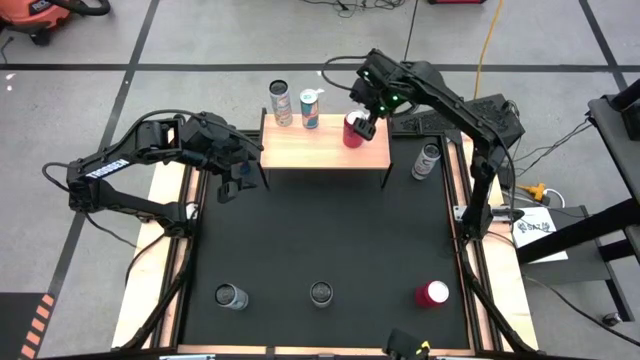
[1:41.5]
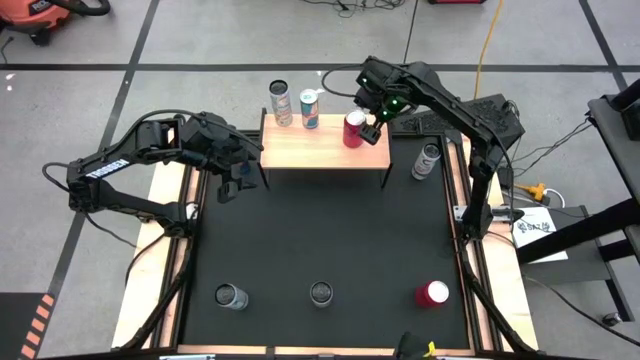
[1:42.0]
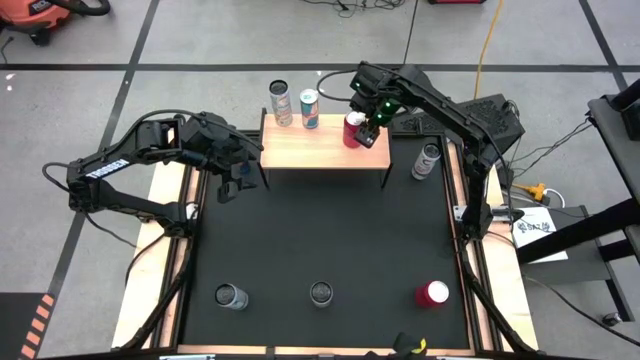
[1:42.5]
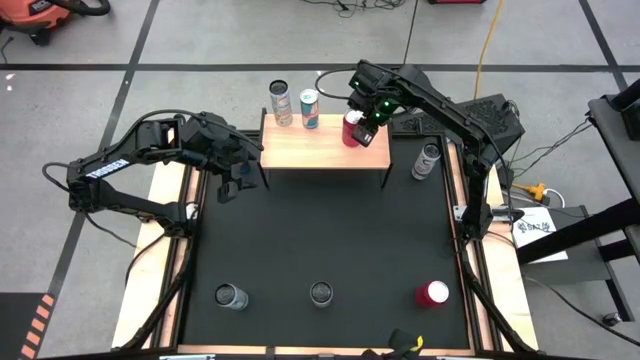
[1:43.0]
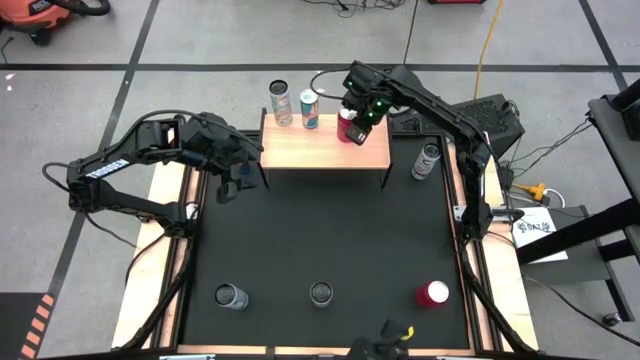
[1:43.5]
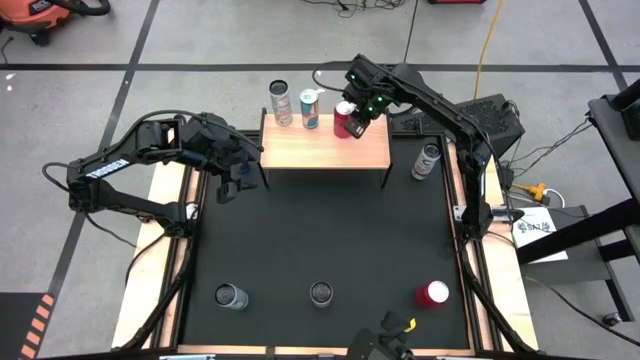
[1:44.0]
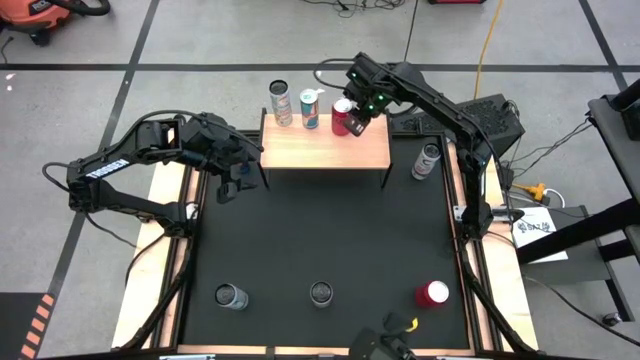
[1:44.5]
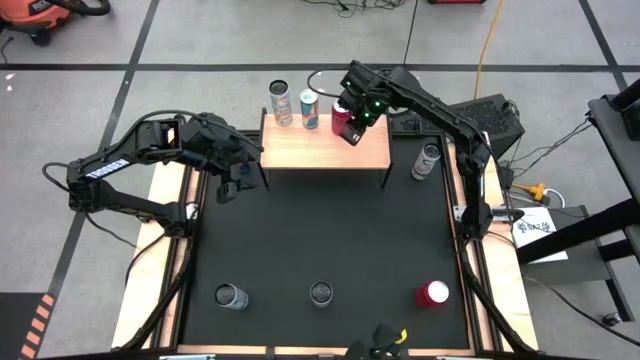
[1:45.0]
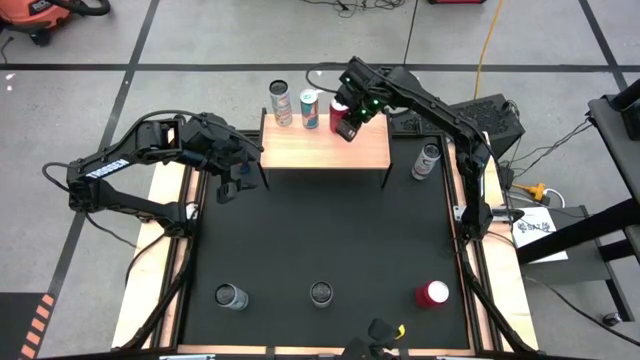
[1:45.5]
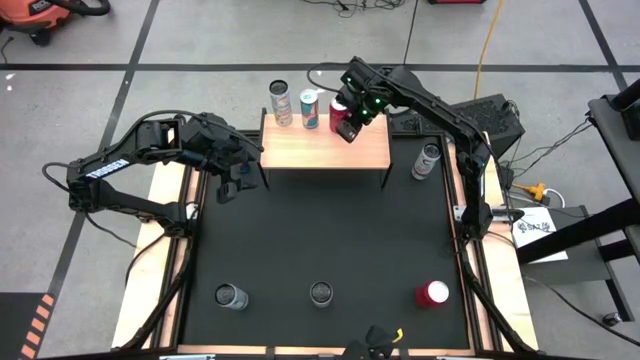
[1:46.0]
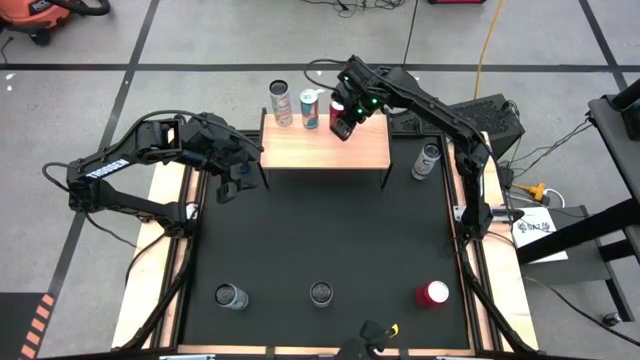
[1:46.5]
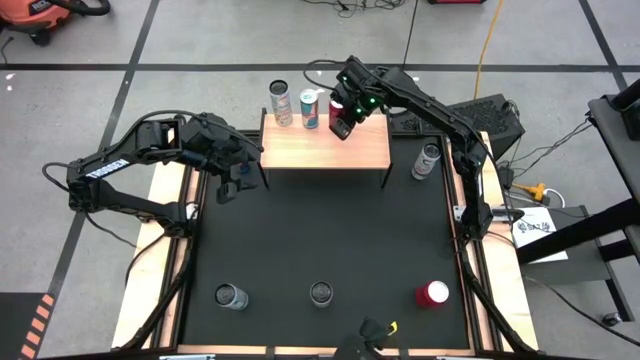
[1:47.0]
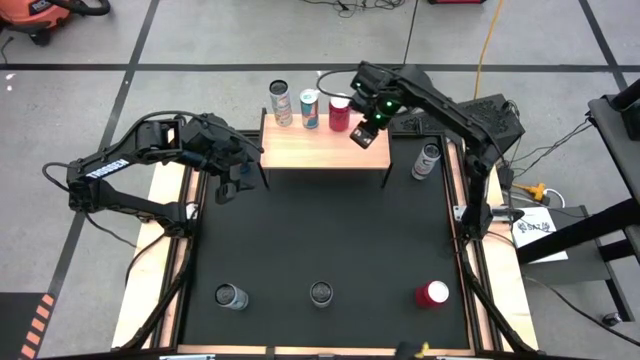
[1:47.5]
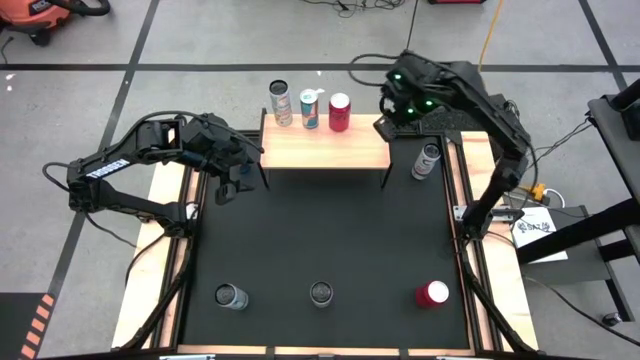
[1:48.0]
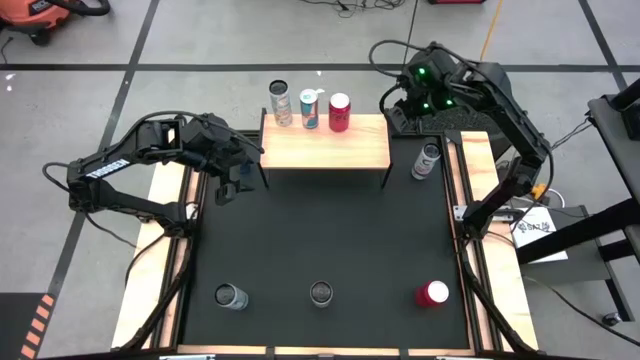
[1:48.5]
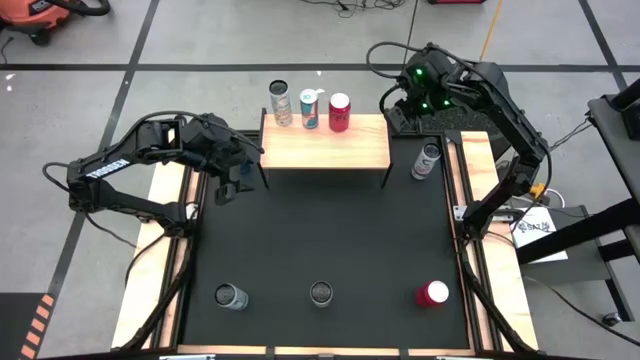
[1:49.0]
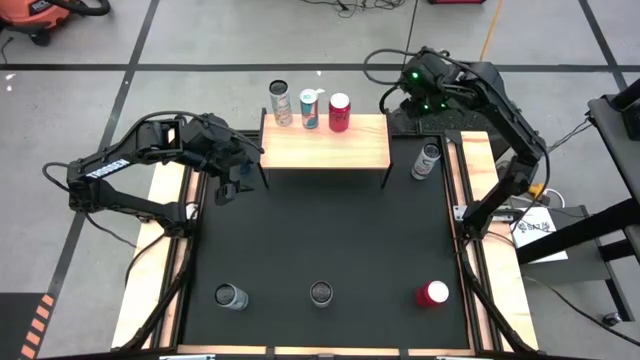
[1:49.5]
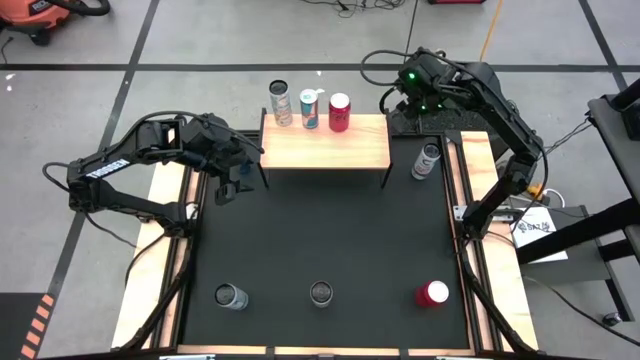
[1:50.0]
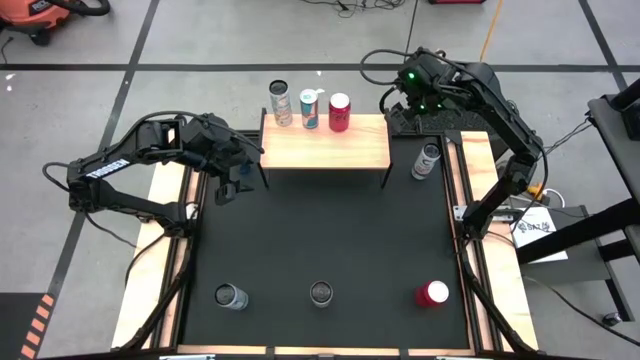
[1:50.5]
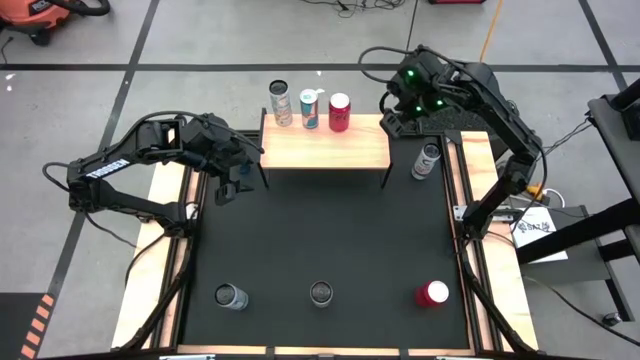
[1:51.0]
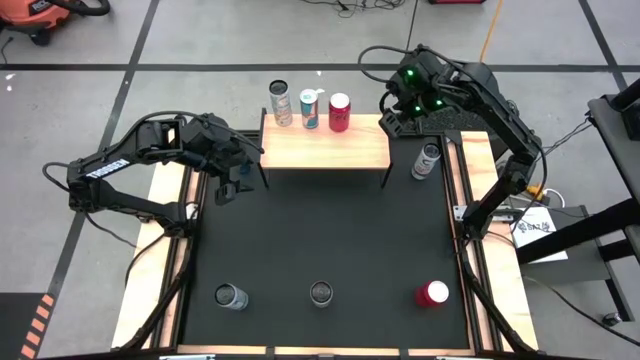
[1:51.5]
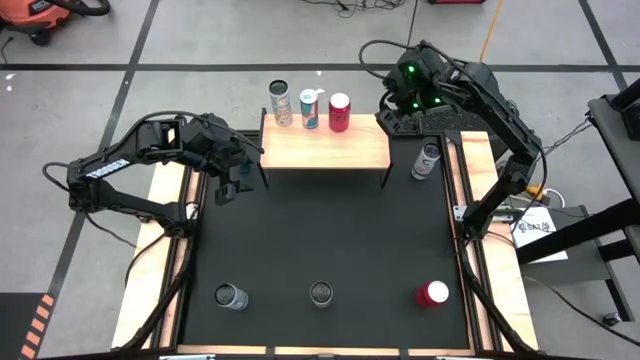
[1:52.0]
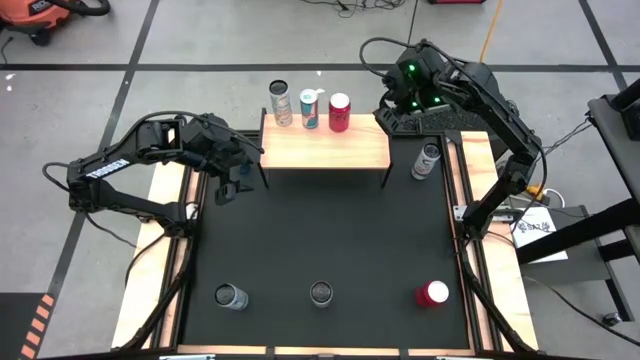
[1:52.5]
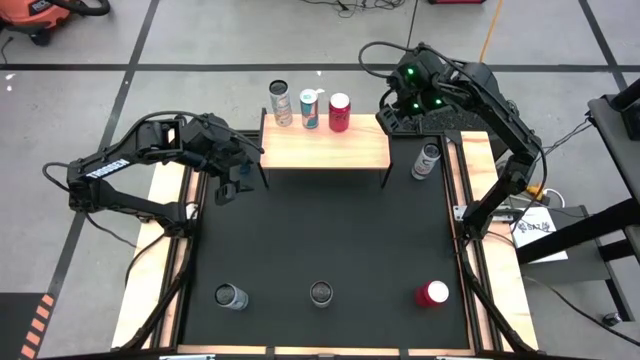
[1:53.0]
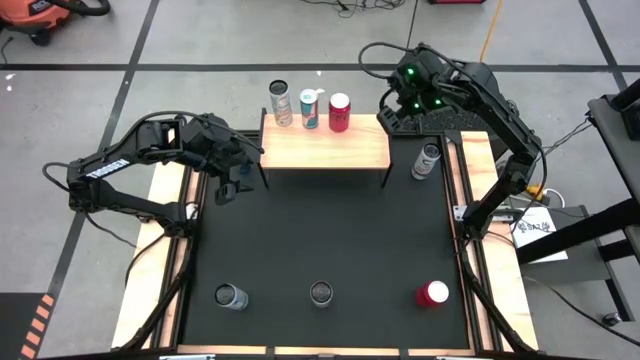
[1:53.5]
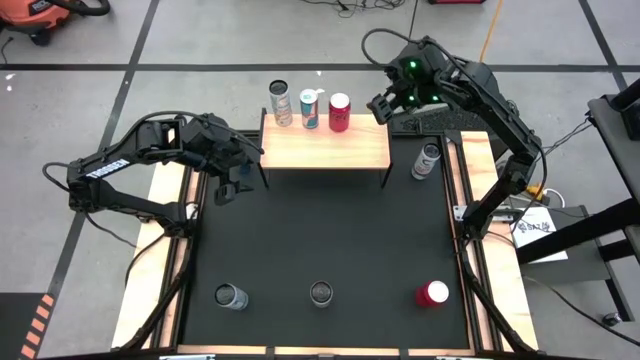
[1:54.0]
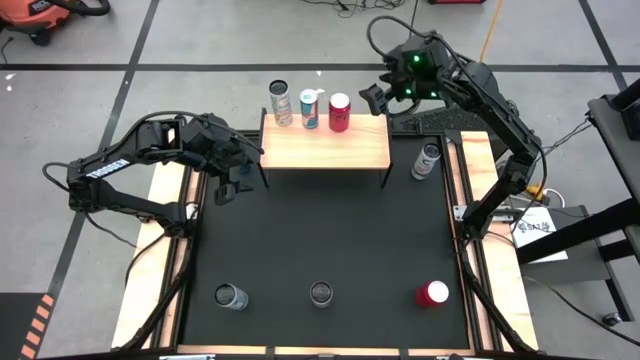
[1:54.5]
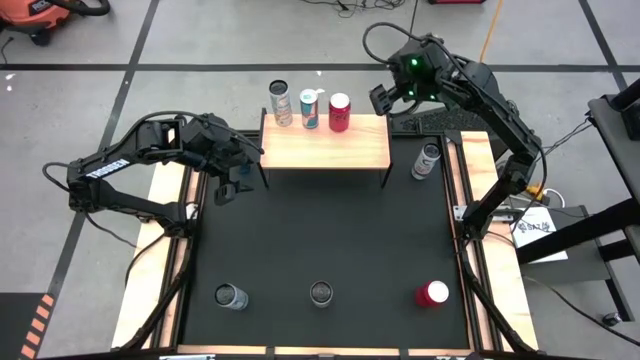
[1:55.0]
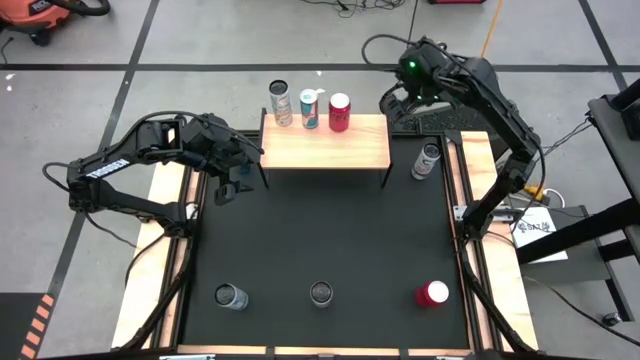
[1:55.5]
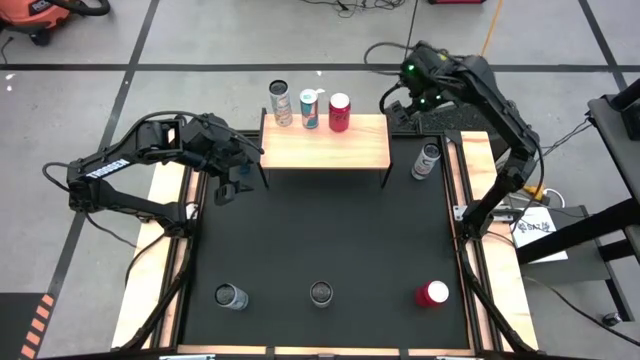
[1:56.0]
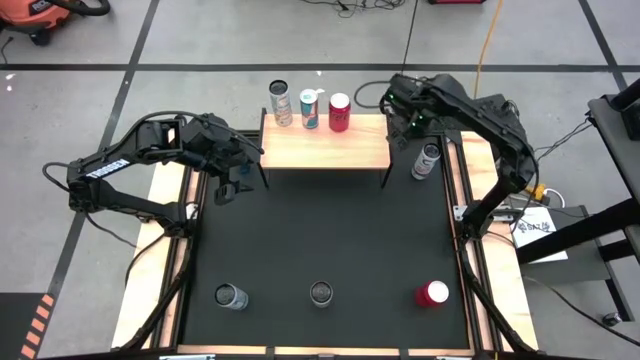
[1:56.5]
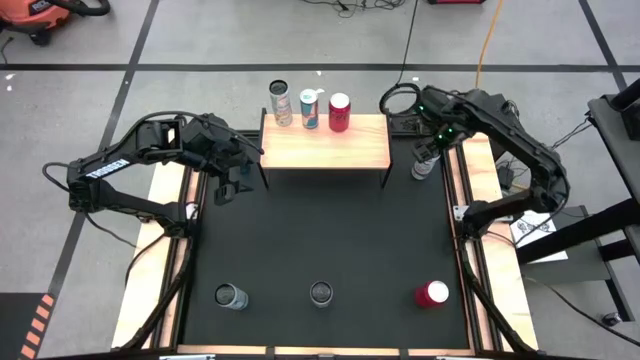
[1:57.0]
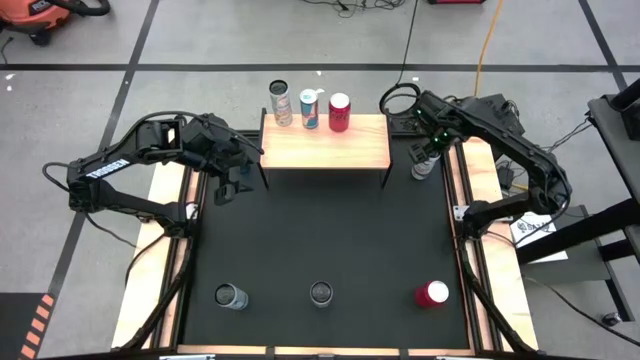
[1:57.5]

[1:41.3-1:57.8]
Task: Place canned beverage on shelf
Put the top white-pink soda can on the shelf

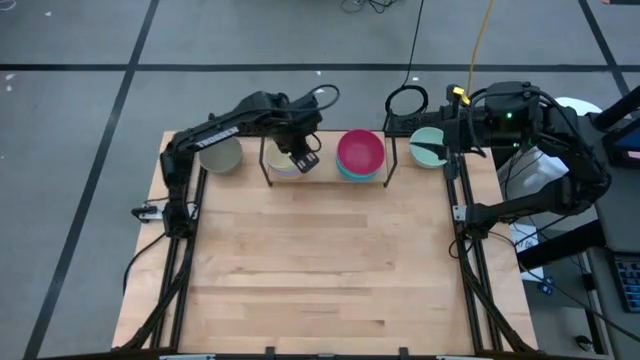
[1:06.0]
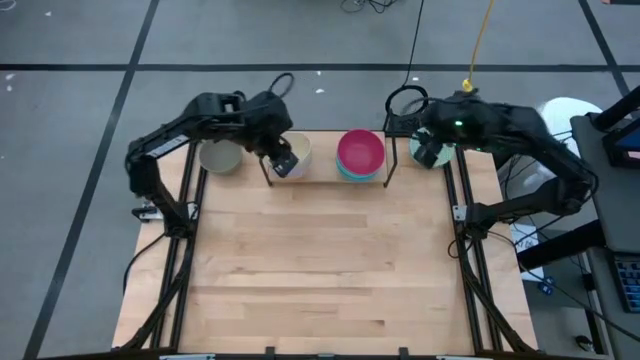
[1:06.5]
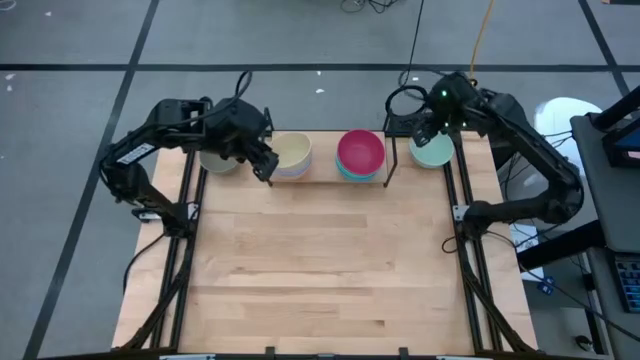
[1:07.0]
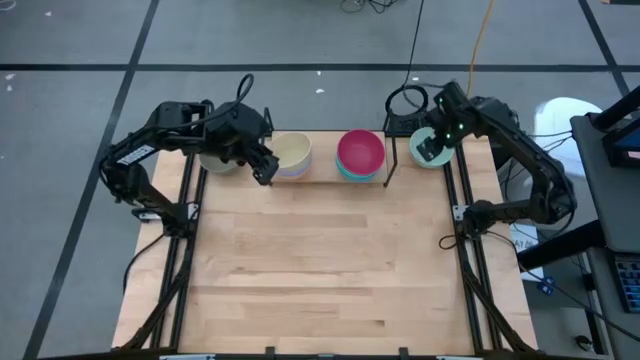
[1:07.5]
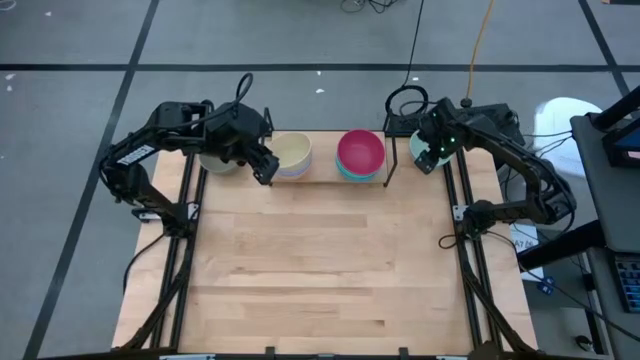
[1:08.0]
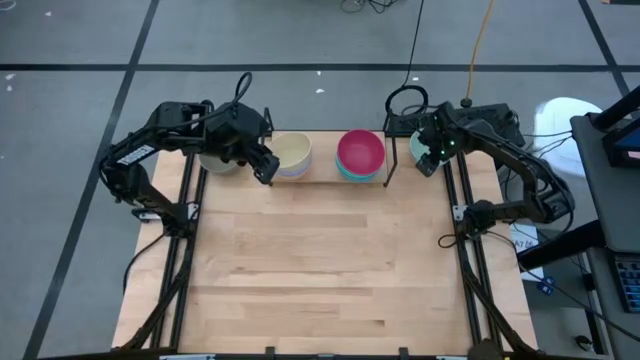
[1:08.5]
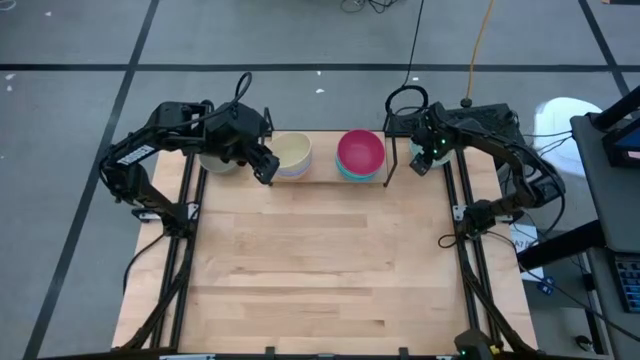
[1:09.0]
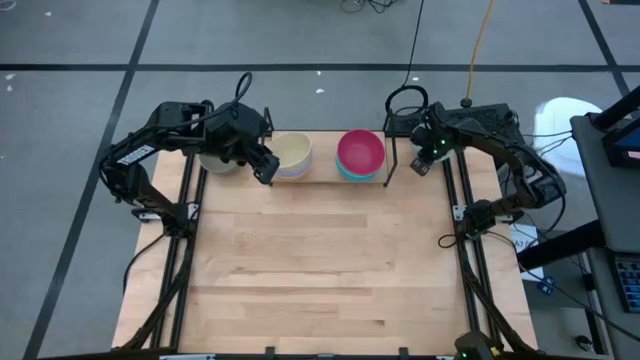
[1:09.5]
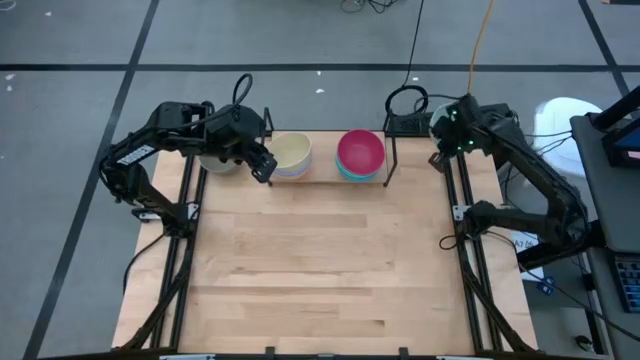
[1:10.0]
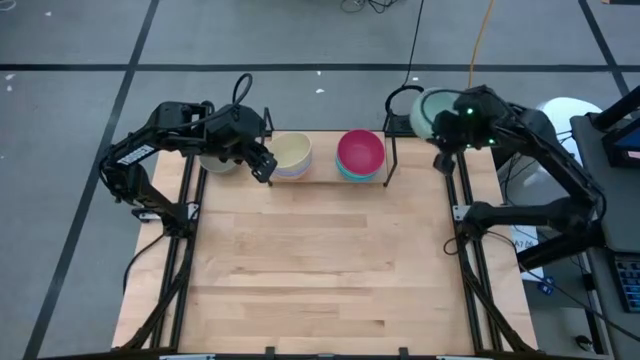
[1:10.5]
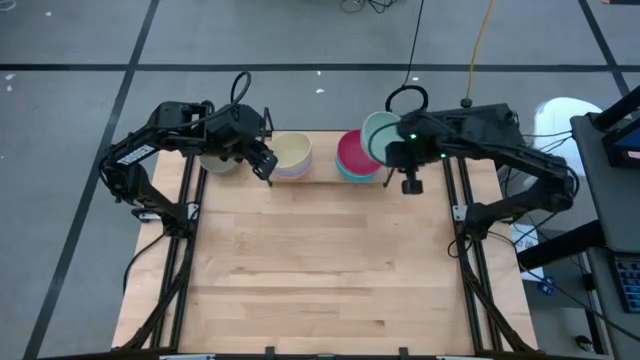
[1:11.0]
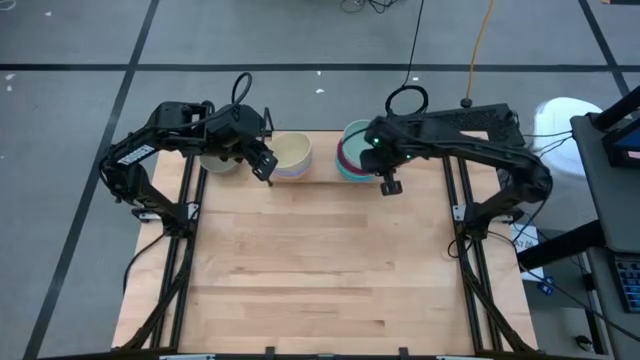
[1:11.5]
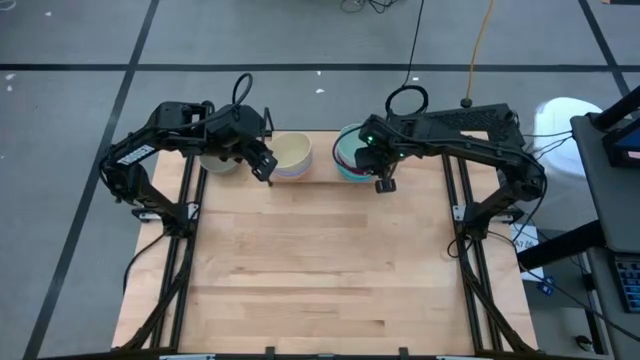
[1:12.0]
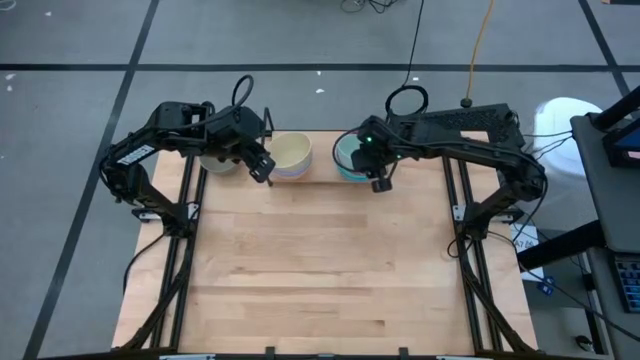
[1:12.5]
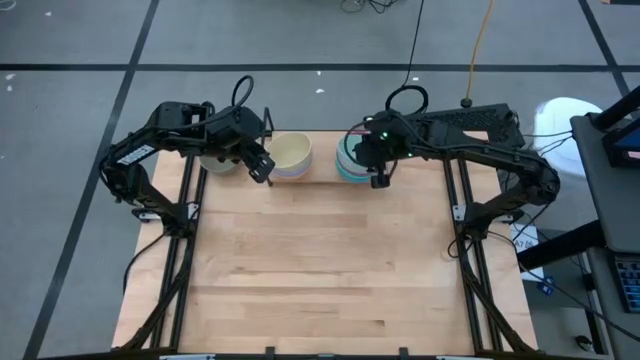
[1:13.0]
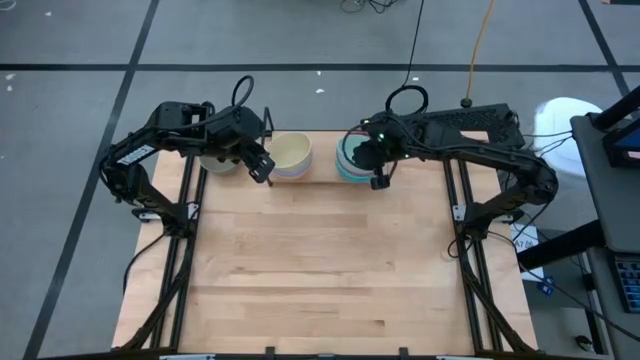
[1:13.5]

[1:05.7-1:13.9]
Task: Place and stack bowls onto a shelf
Stack the green bowl on top of the red bowl on the shelf
